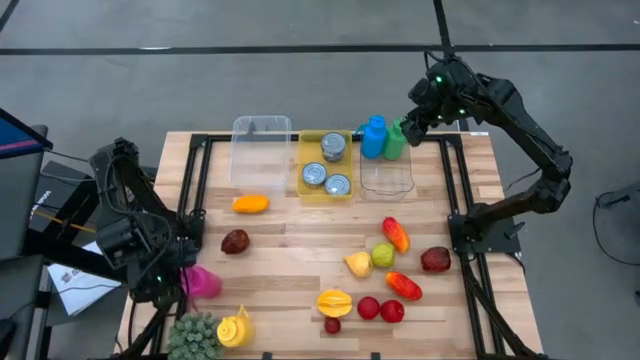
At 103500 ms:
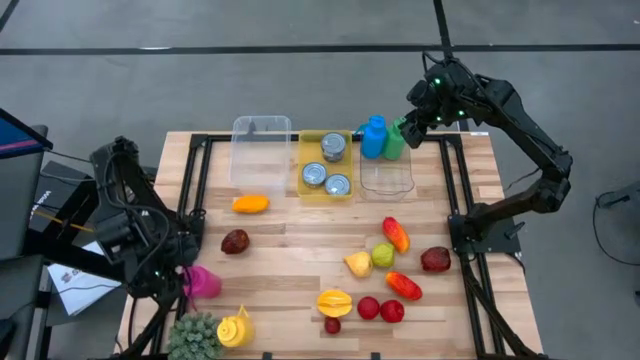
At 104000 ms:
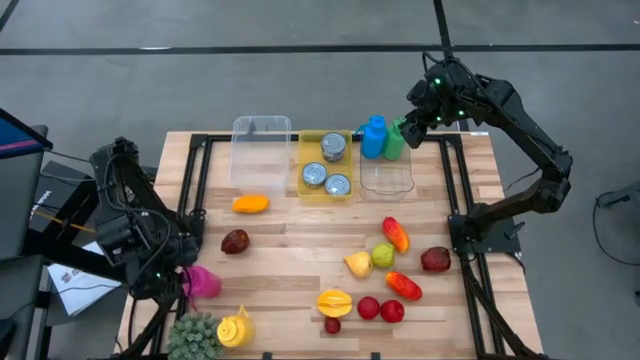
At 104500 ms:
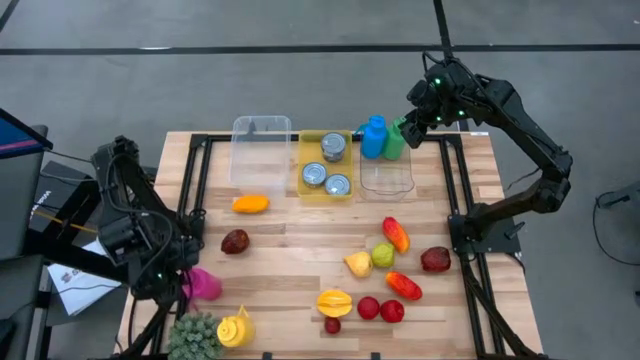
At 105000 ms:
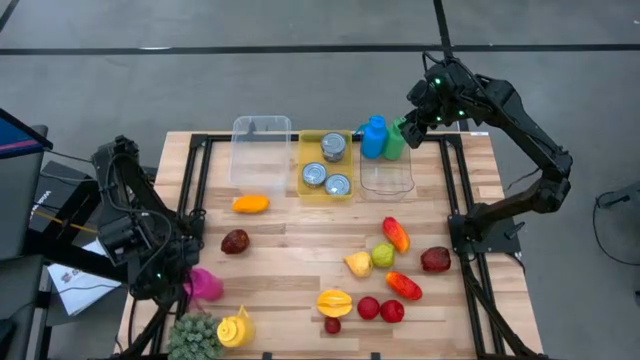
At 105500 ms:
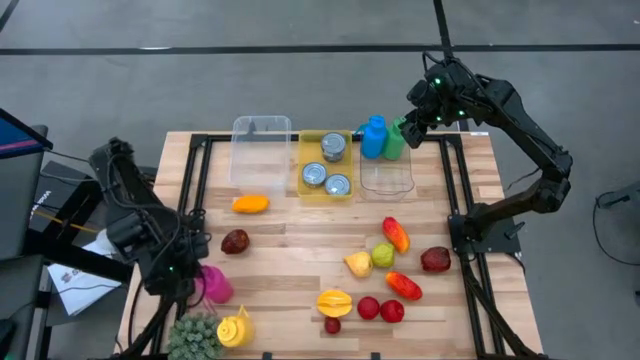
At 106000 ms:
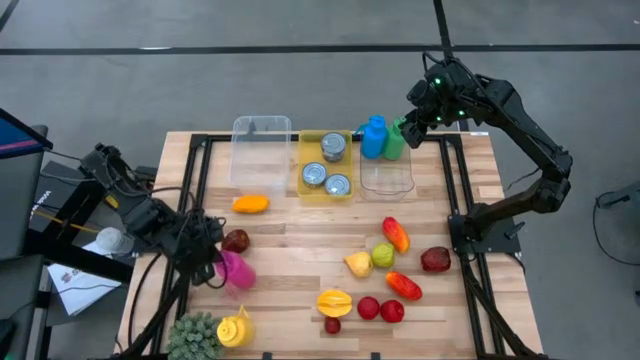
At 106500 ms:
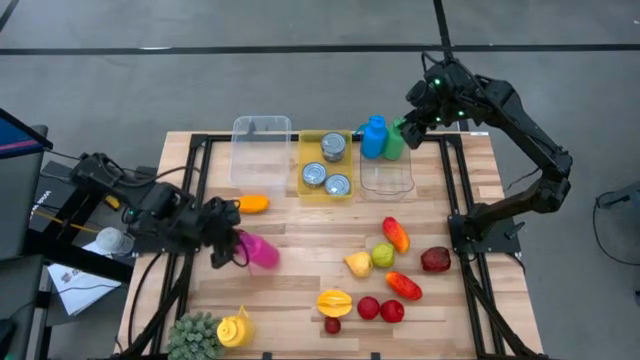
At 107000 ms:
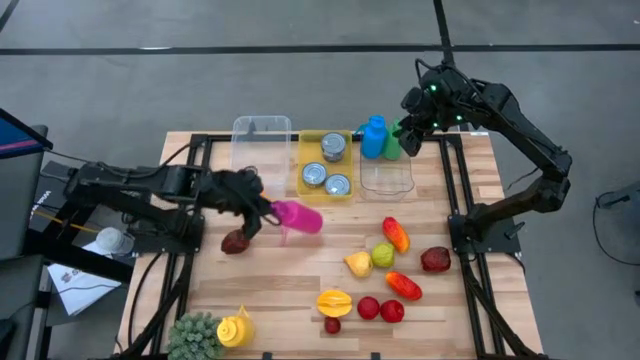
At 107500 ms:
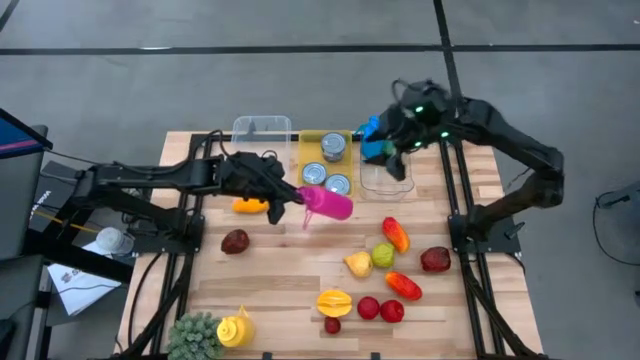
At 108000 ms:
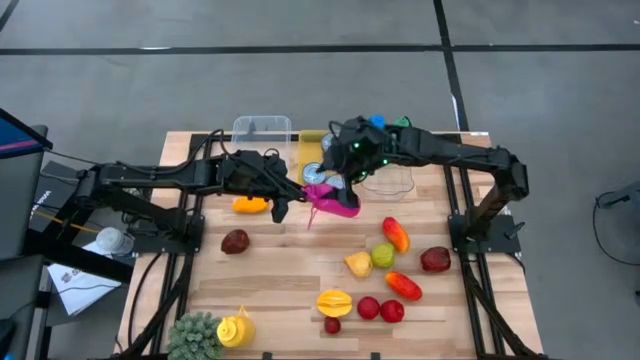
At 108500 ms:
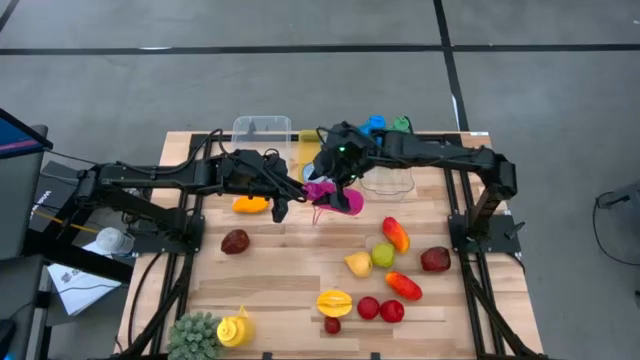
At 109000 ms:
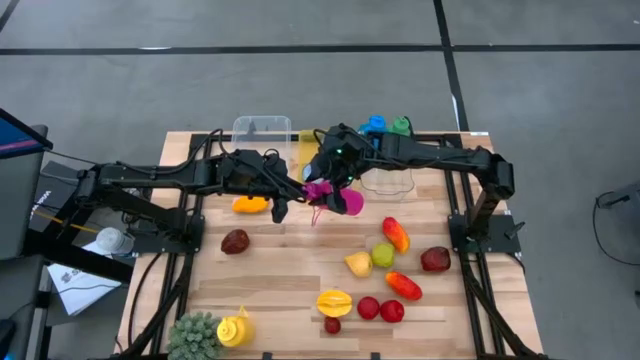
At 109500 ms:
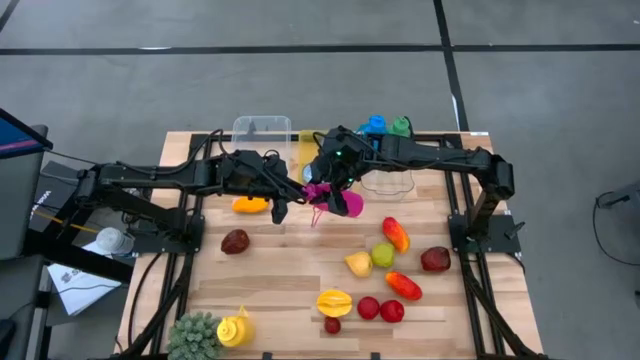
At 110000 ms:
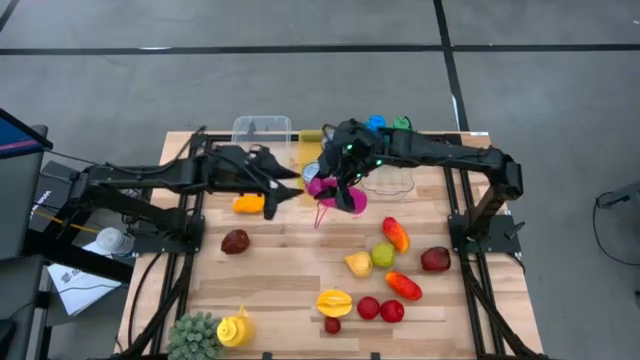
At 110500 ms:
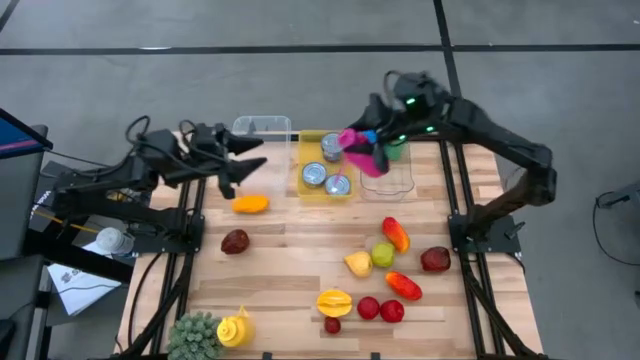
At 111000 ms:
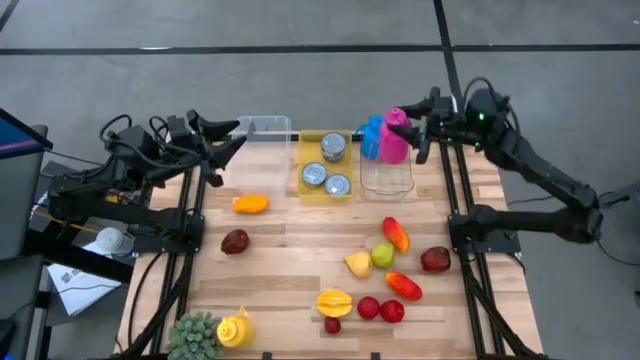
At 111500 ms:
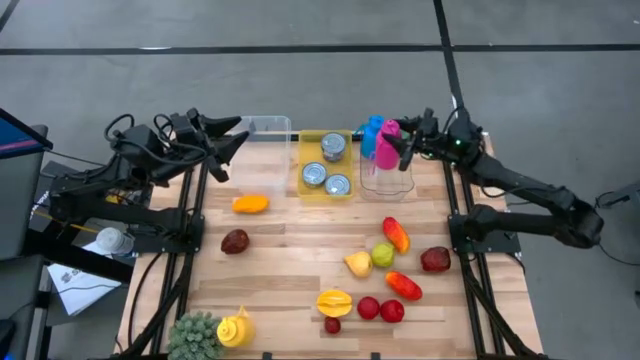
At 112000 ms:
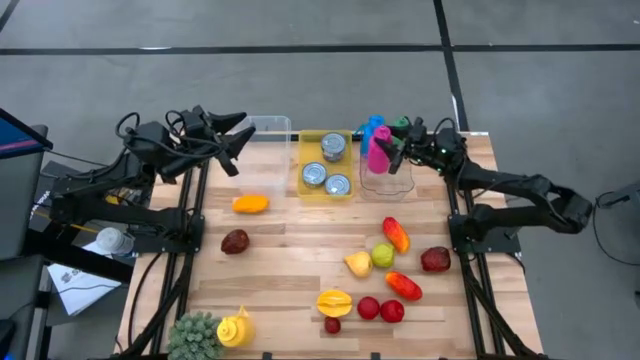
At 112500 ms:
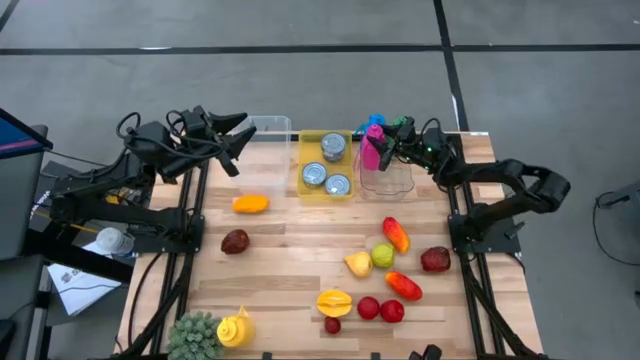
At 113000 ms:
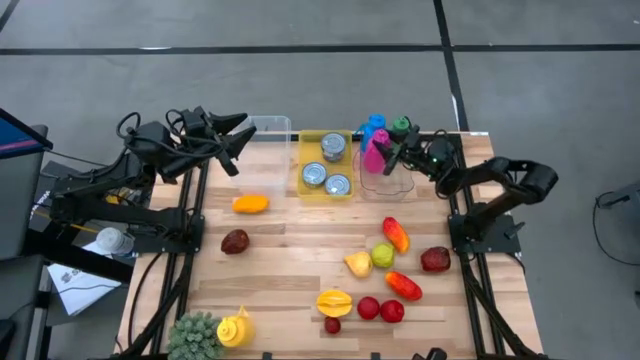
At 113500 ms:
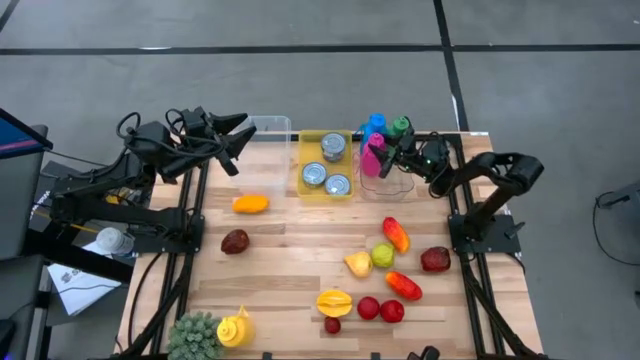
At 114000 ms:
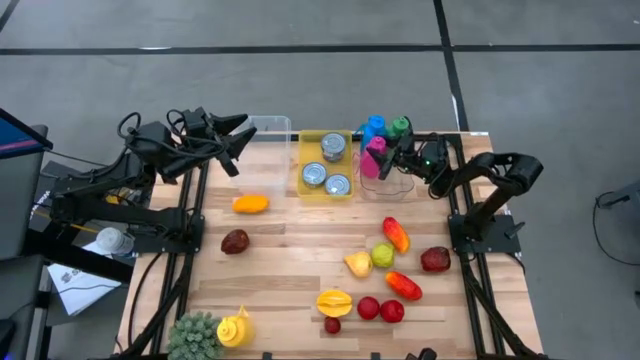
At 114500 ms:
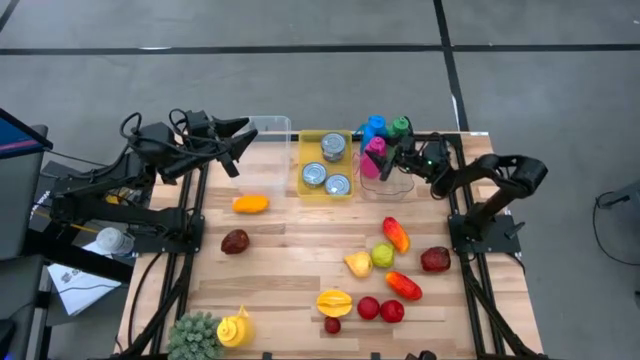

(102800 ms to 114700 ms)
Task: Pick & Place Food Item
Put the pink tumbler into the transparent bin

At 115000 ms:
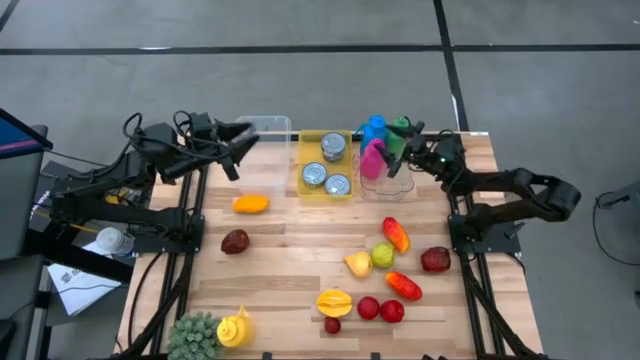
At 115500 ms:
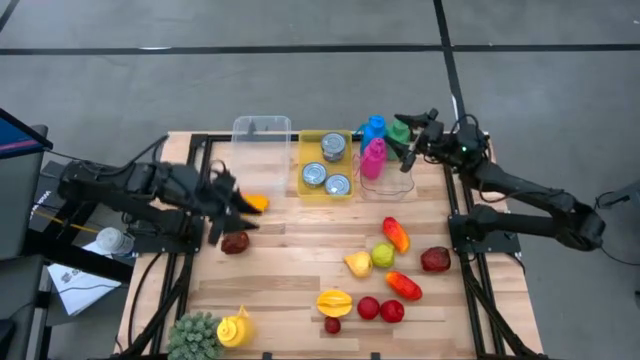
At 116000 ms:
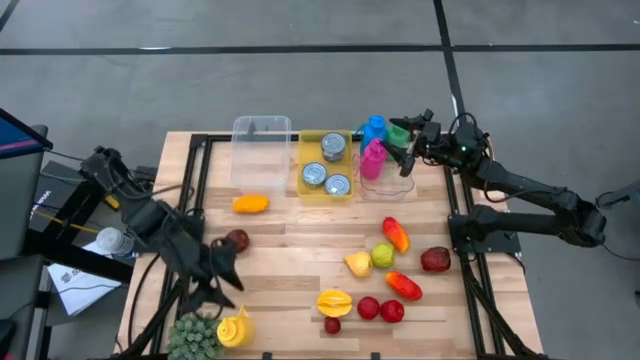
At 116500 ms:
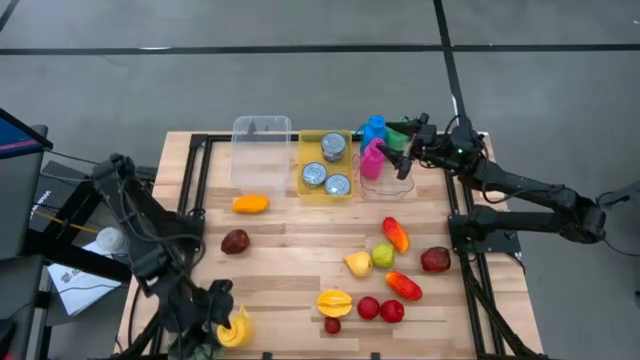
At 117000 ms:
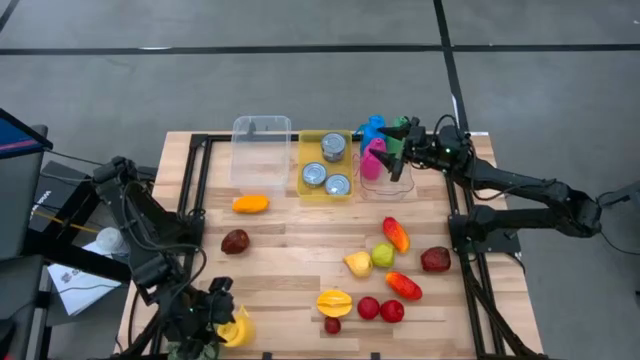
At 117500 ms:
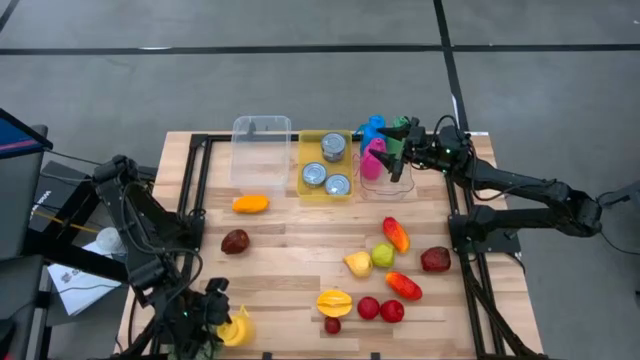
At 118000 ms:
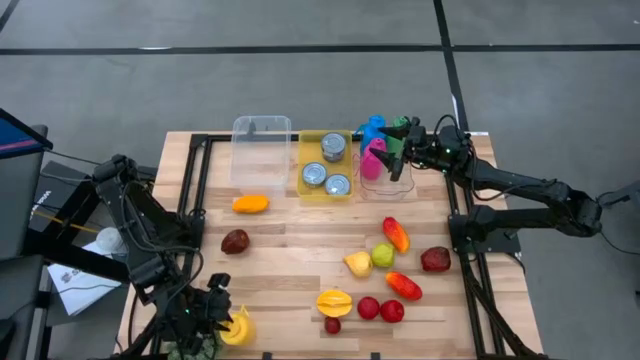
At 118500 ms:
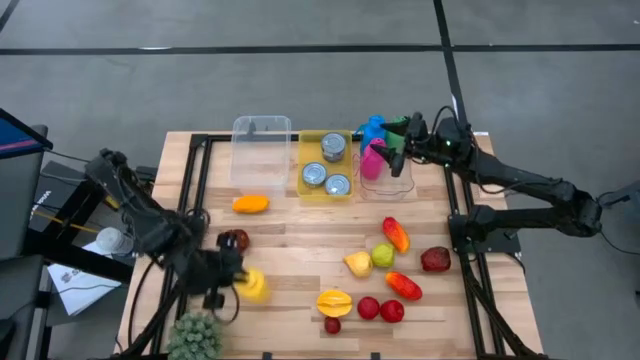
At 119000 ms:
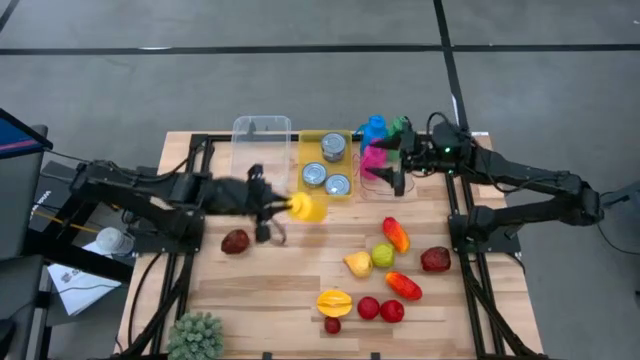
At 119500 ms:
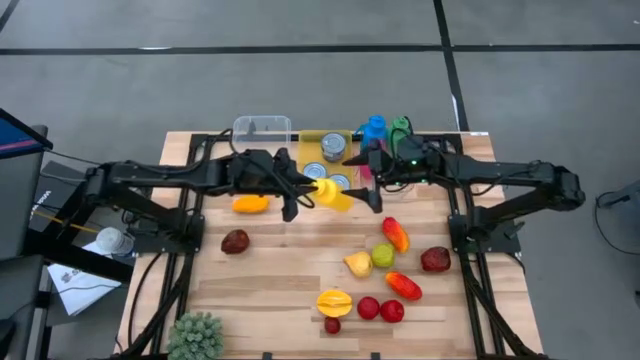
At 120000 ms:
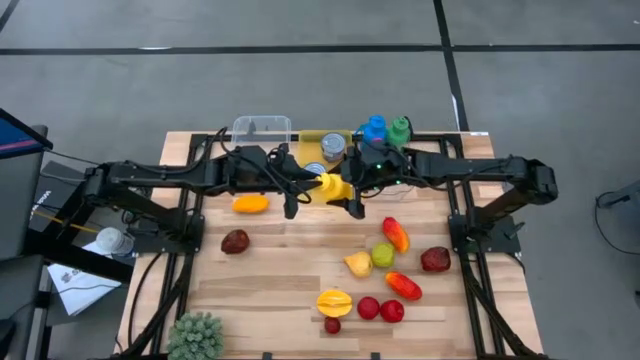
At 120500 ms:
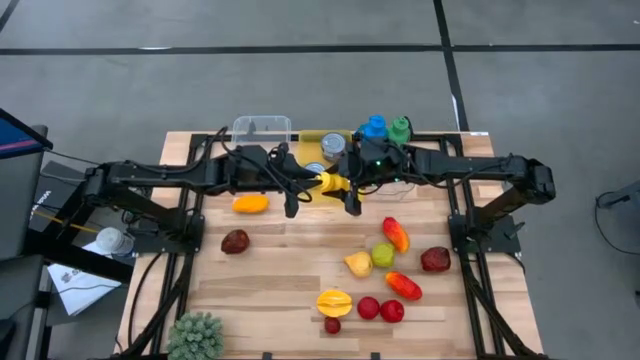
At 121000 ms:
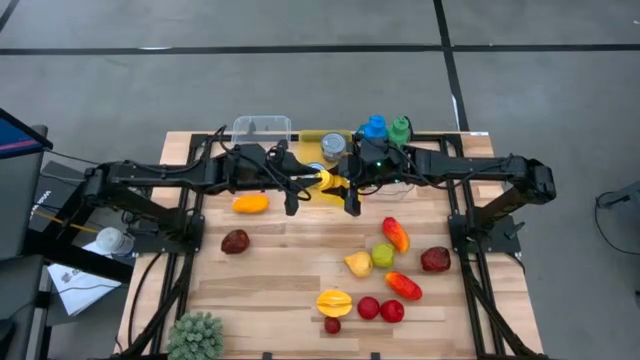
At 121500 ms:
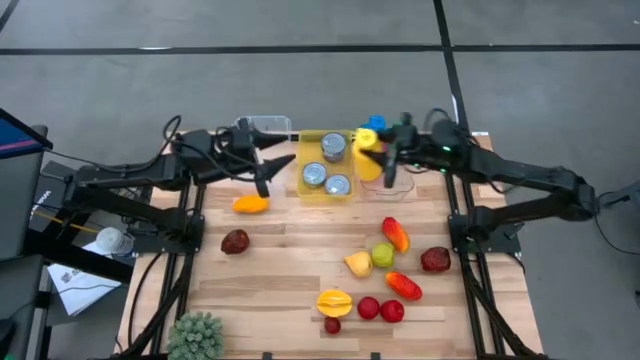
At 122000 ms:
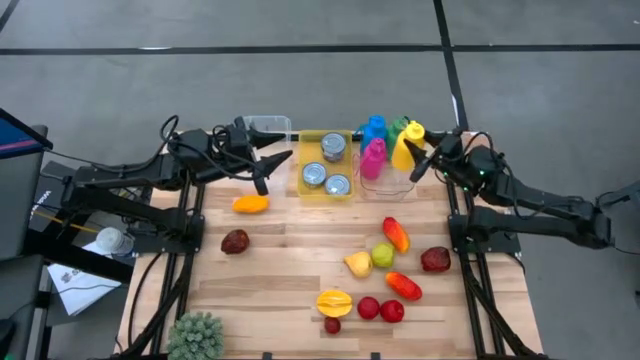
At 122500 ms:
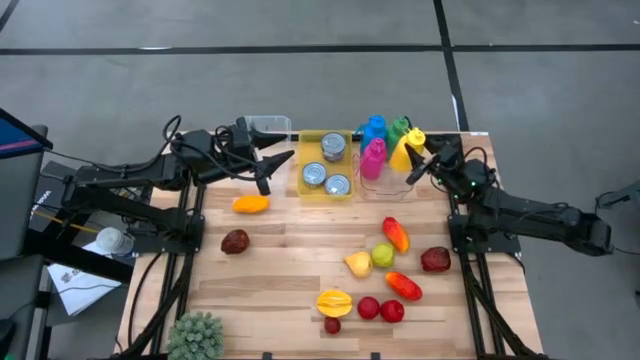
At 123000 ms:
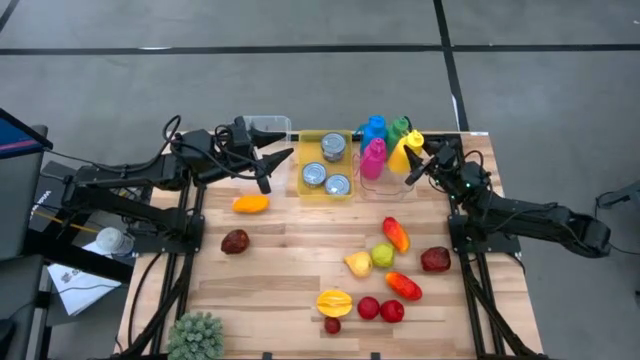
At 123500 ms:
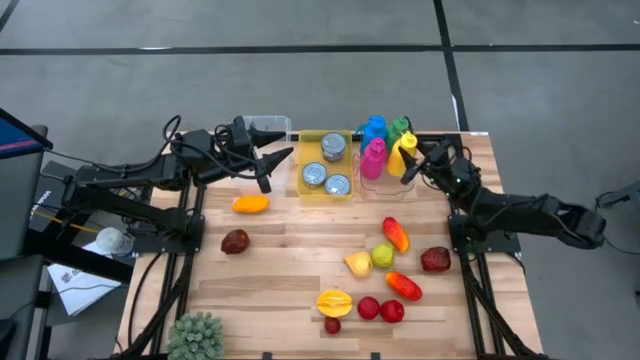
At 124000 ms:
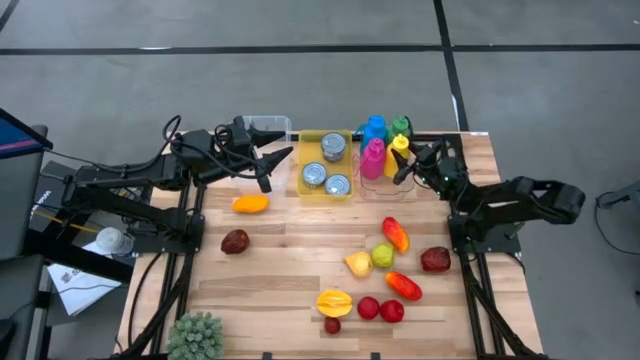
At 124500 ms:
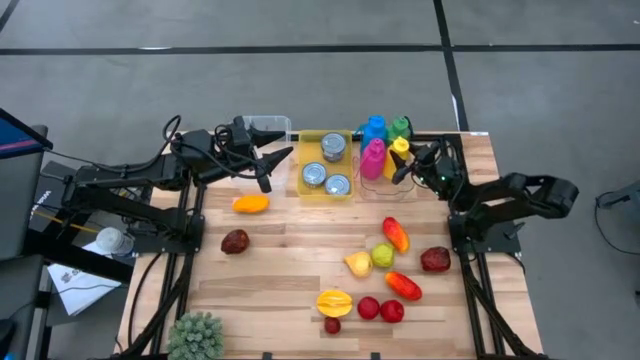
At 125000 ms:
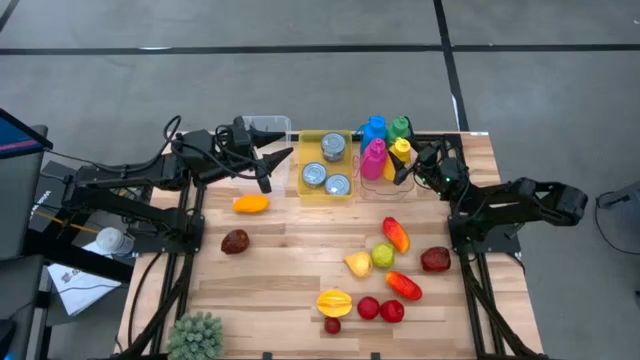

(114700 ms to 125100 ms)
Put the yellow tumbler into the transparent bin
